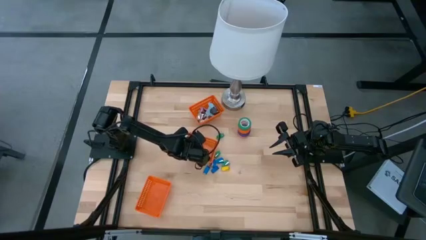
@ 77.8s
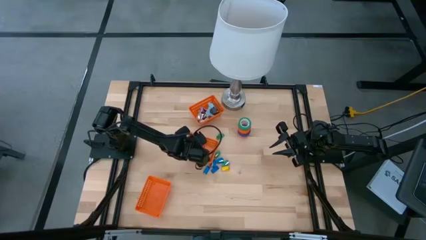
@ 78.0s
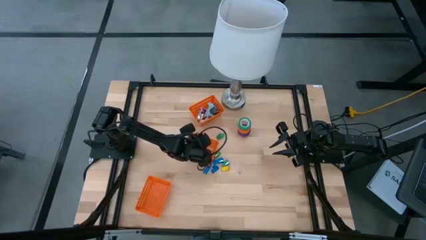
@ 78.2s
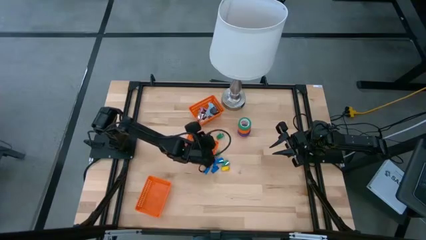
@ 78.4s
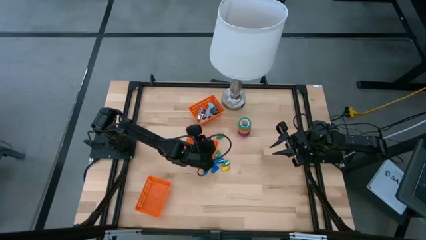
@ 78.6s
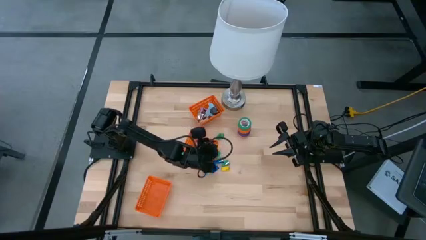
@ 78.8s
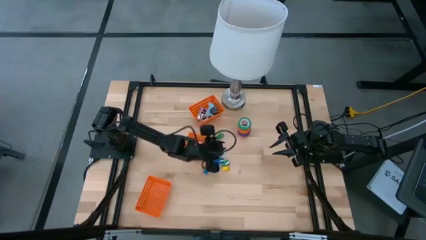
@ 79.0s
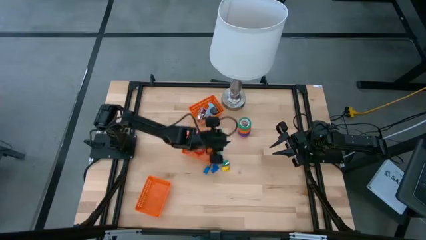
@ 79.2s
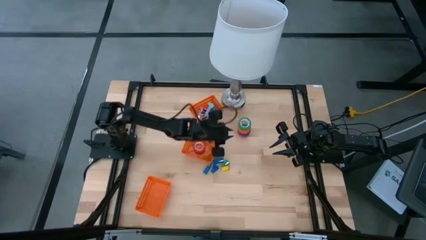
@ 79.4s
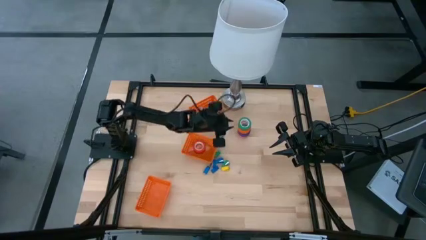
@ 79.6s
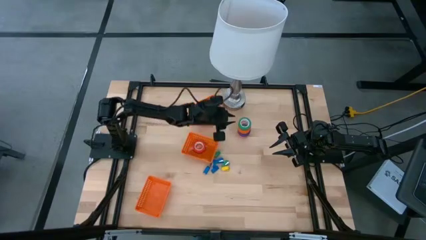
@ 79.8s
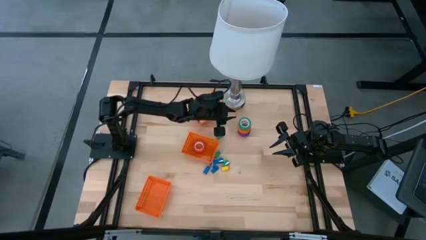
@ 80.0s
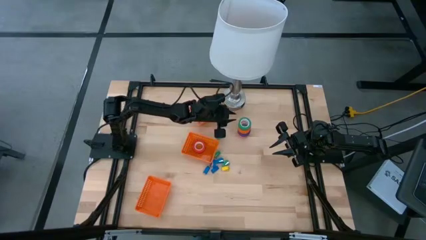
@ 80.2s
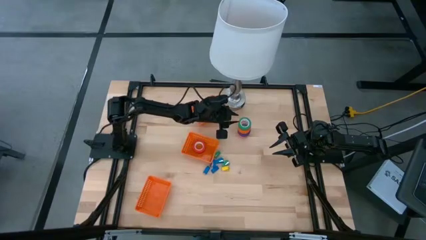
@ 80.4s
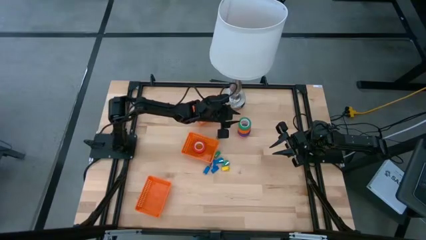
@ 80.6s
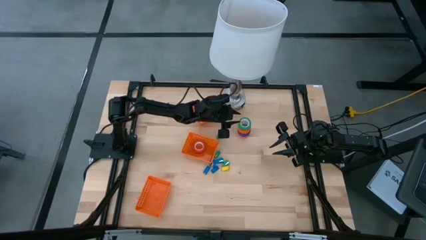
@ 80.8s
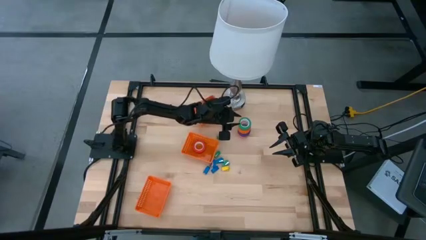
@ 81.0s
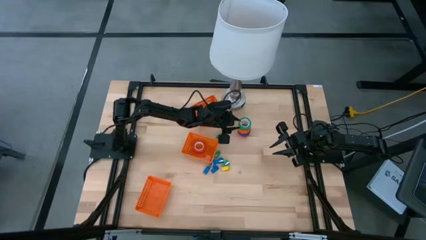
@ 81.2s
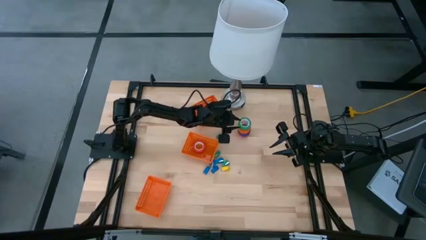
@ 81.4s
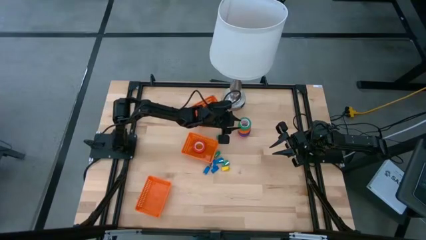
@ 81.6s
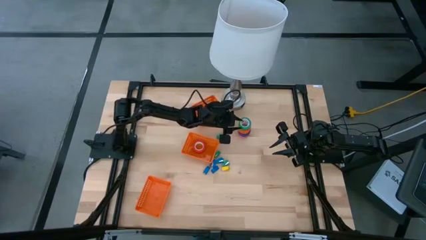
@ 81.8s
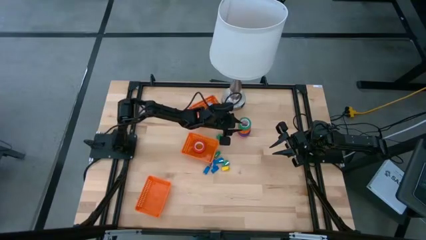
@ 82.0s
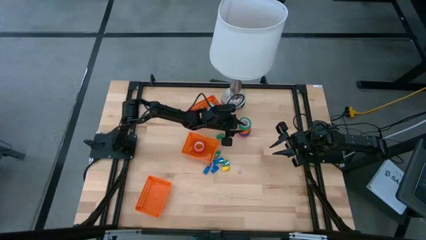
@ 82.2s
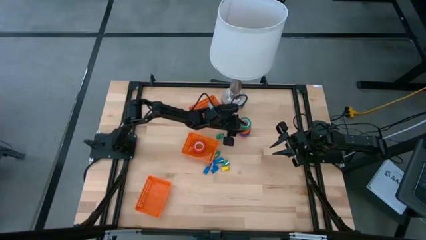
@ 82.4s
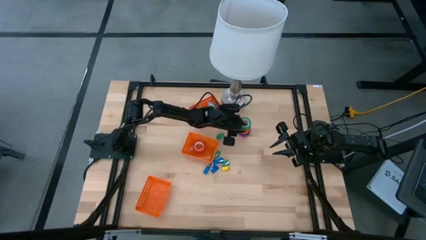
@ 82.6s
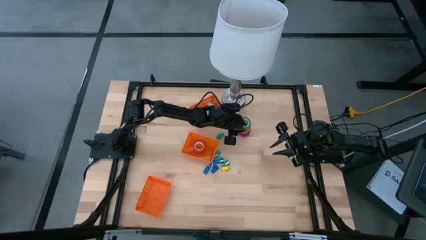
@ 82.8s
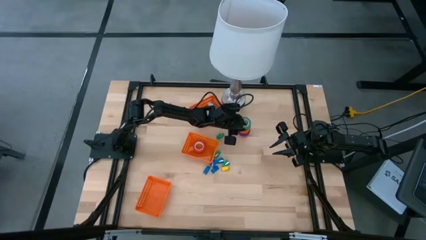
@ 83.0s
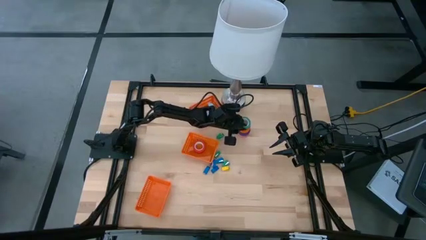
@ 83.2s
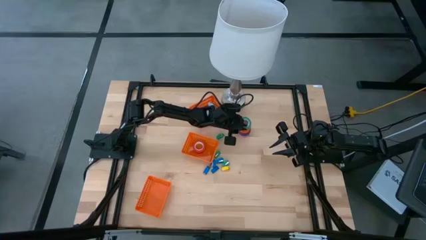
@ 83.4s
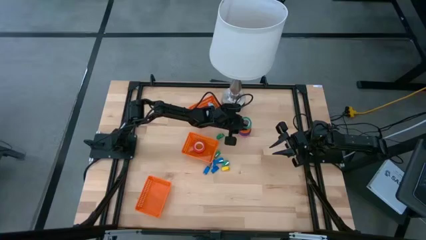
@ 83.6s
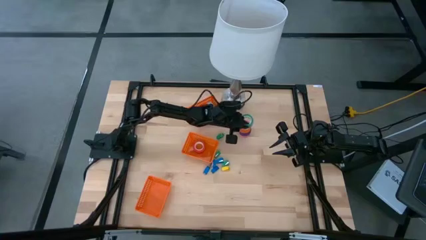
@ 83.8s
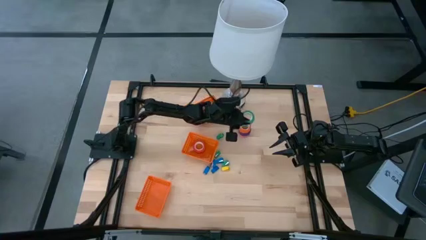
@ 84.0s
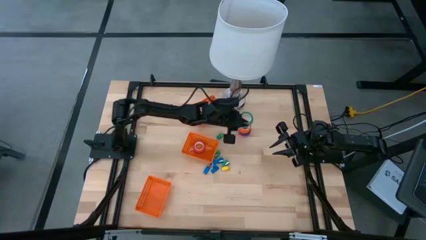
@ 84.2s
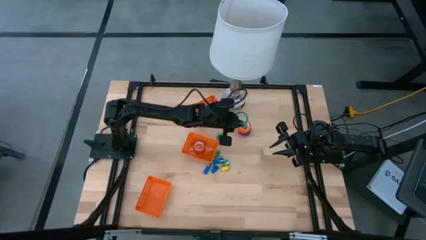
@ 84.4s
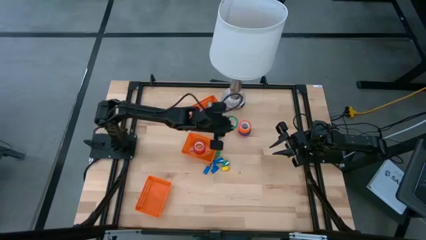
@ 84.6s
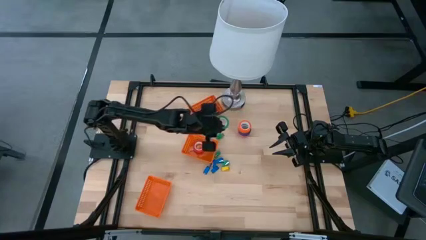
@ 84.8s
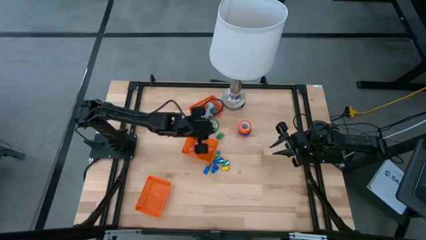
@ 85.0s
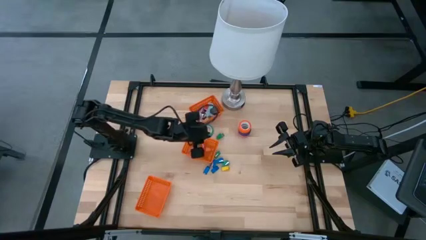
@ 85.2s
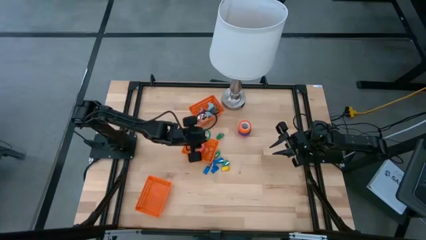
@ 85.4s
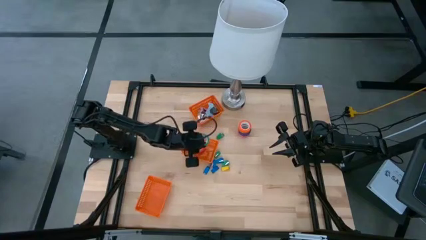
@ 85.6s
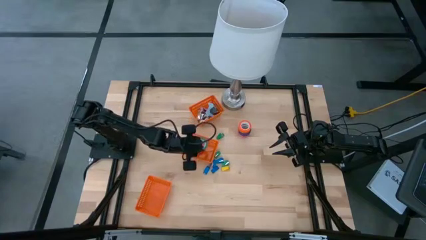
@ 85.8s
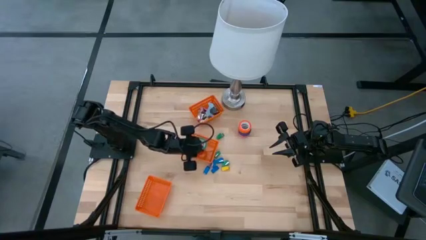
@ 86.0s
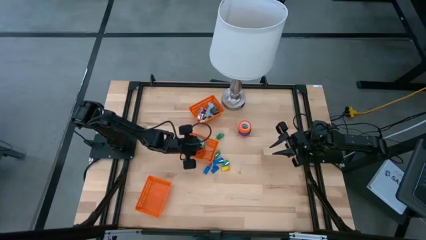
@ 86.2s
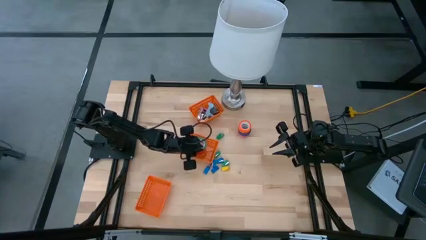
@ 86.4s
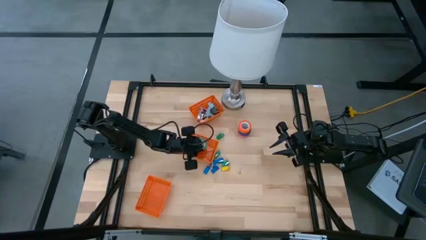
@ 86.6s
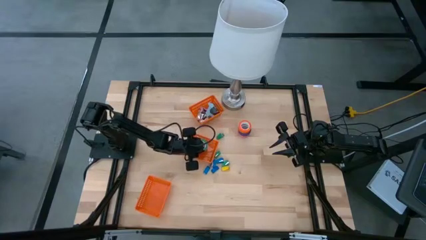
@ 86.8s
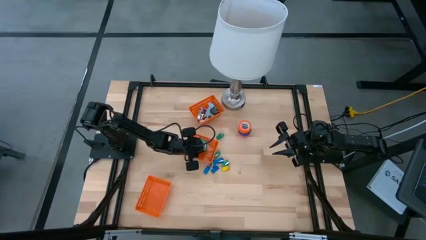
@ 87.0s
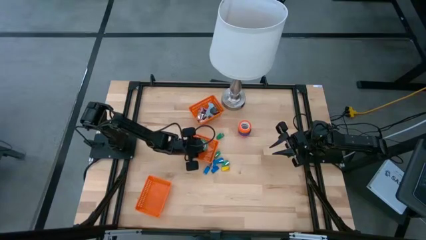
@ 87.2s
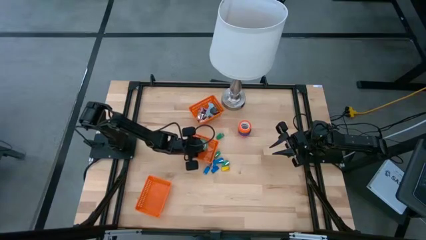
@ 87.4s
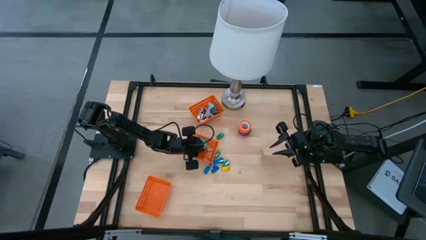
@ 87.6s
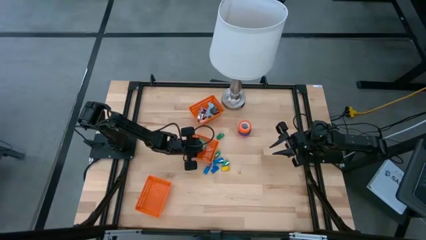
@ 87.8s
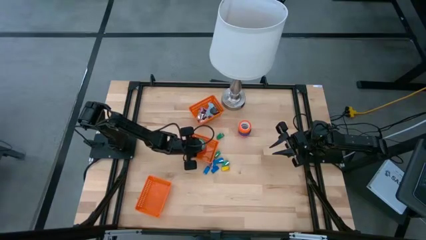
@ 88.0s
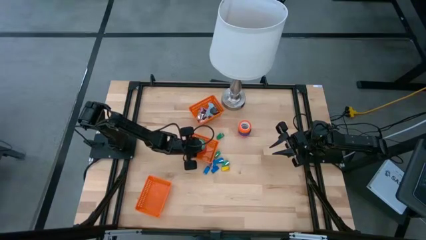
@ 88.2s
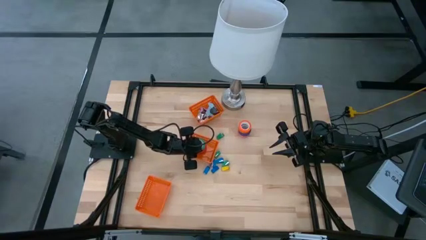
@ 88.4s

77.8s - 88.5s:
Task: Pick and place Stapler, Stapler remover, tape
Put the green tape into the middle orange bin

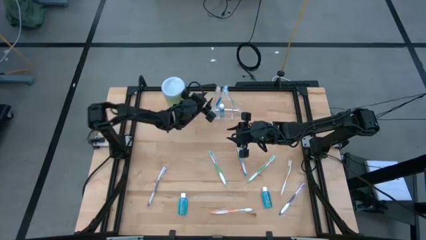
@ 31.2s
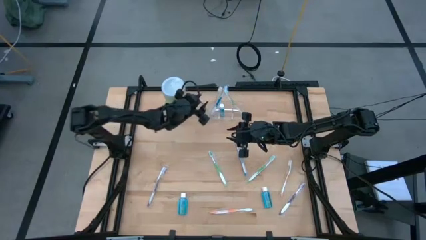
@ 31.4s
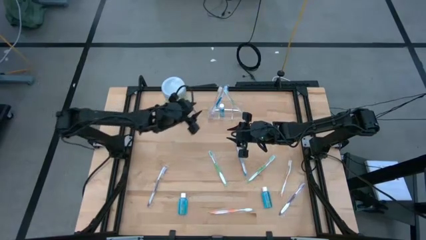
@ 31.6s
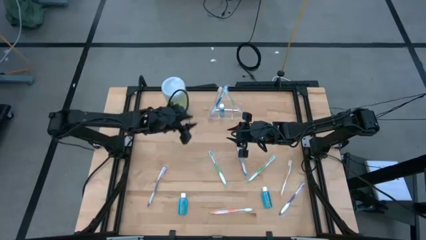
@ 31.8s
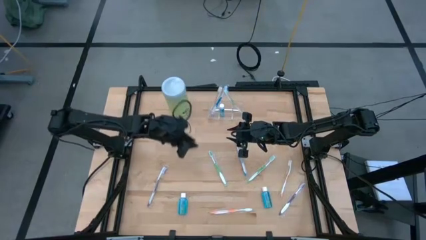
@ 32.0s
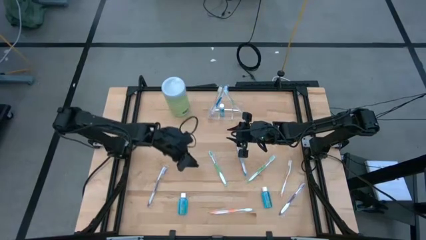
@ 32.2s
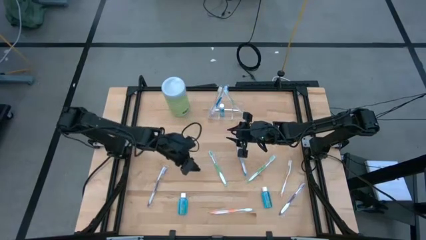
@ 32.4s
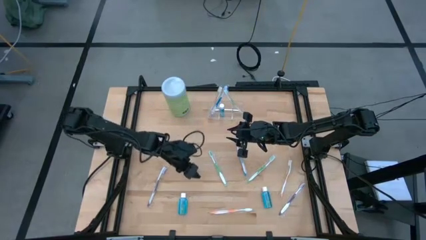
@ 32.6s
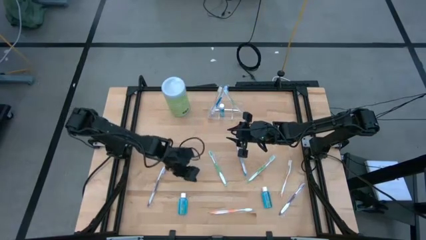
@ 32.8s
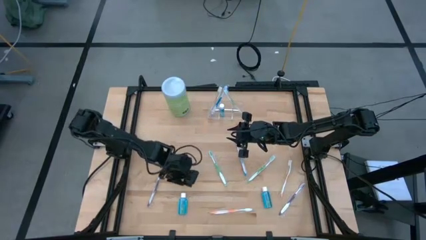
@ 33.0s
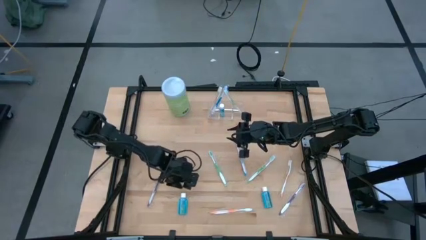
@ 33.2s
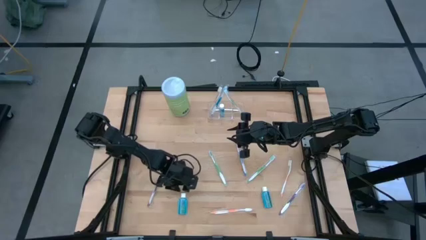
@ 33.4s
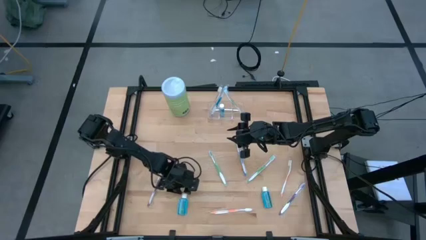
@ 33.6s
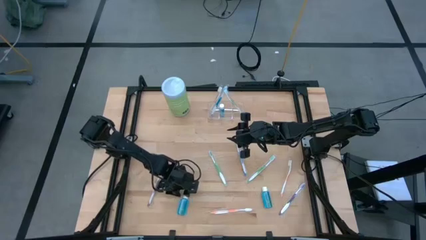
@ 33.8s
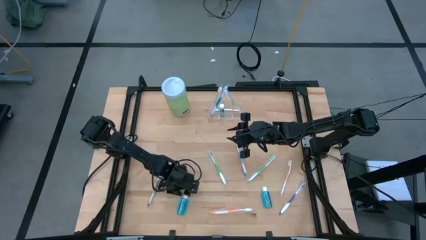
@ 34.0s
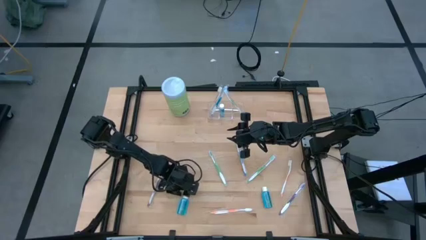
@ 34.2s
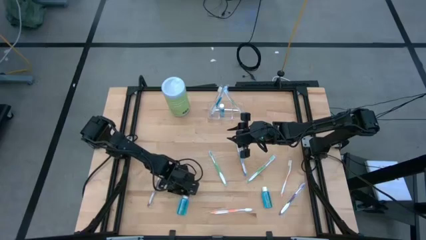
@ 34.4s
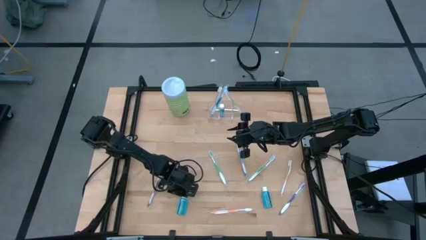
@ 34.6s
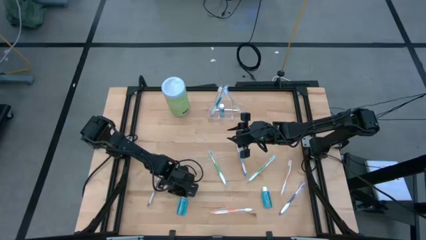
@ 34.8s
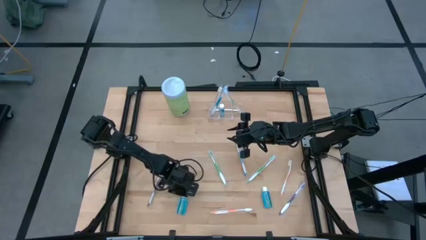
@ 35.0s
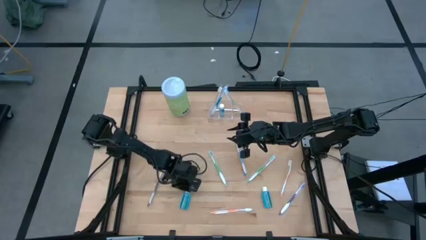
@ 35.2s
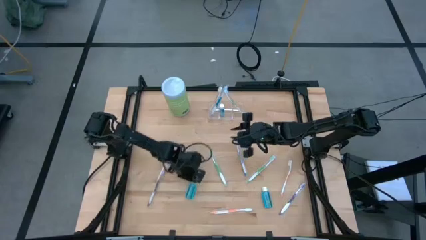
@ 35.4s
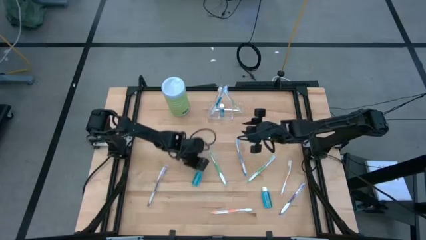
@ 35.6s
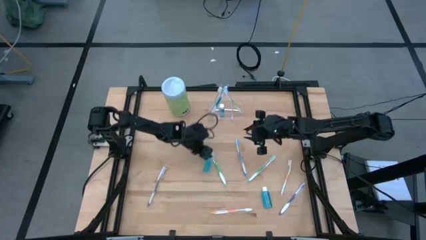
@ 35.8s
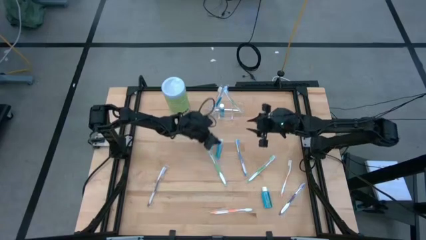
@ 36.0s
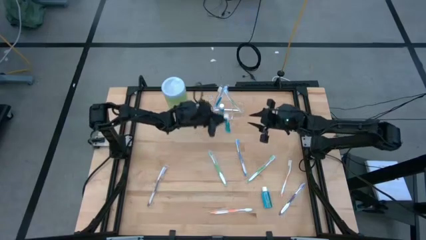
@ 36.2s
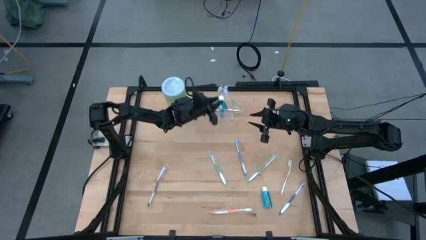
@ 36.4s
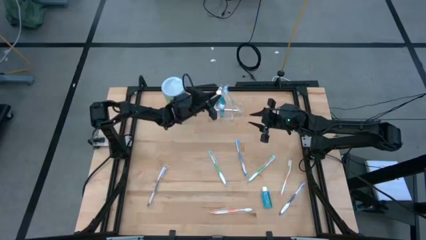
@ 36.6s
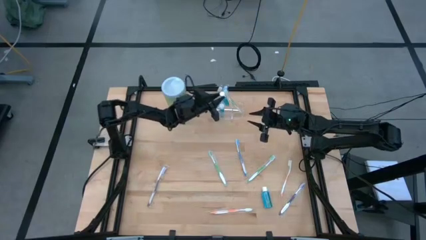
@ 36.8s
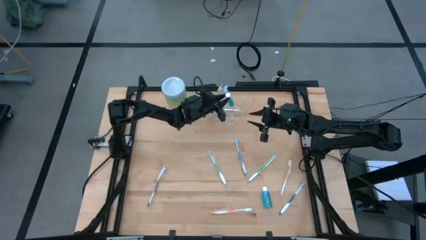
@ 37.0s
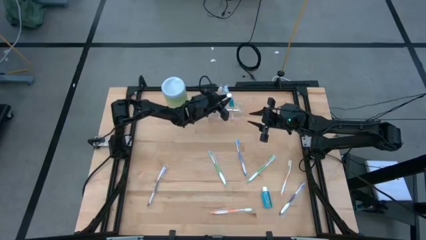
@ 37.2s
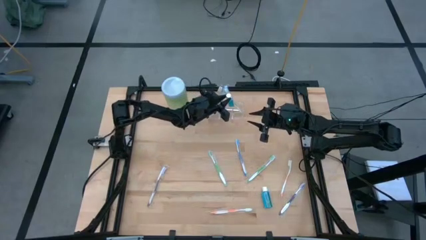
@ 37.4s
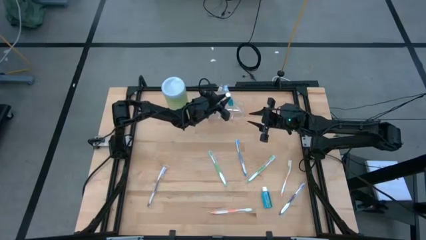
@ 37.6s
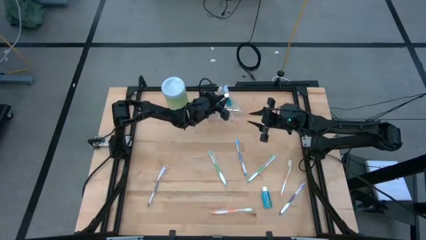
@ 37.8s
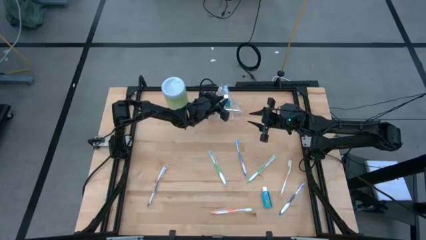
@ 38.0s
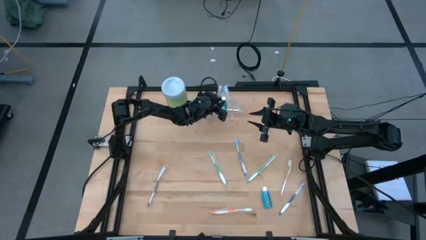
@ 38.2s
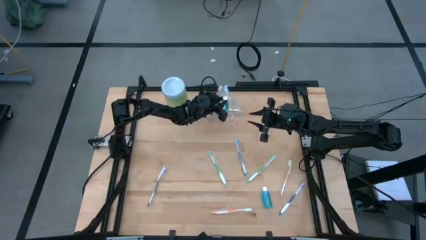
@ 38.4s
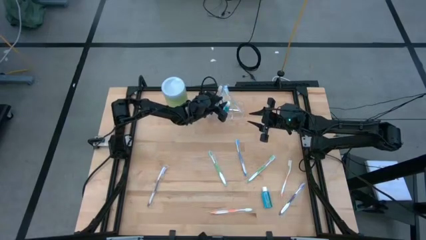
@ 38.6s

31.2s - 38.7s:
Task: Pick & Place toothbrushing station
Put the left mouthwash bottle into the transparent bin
